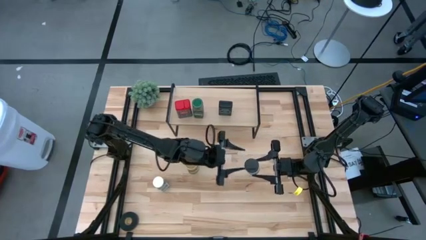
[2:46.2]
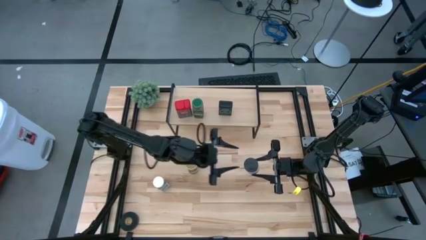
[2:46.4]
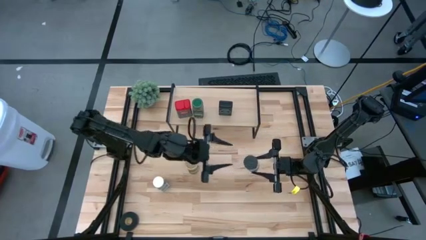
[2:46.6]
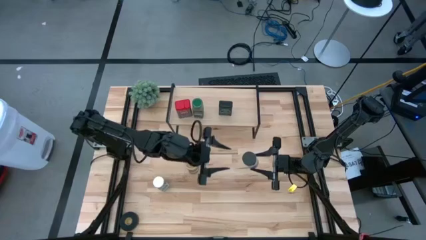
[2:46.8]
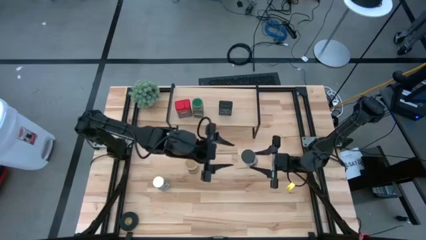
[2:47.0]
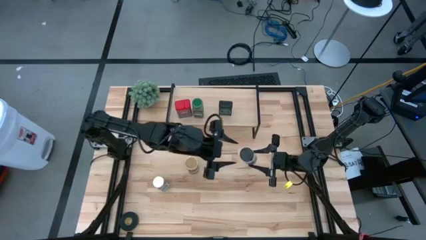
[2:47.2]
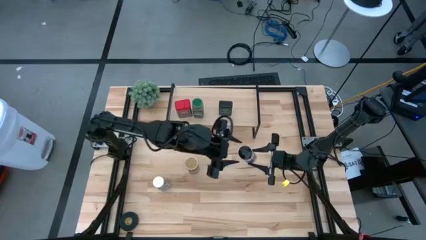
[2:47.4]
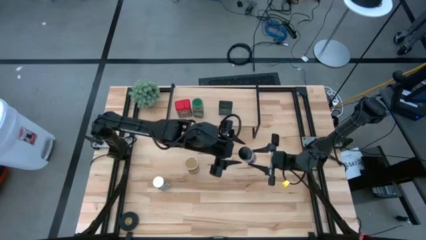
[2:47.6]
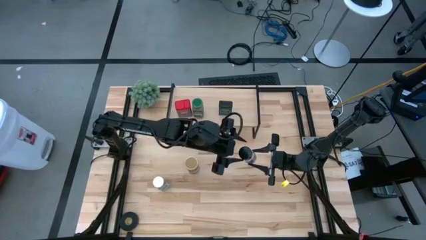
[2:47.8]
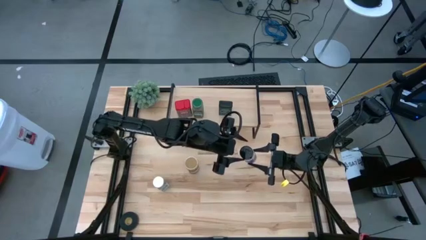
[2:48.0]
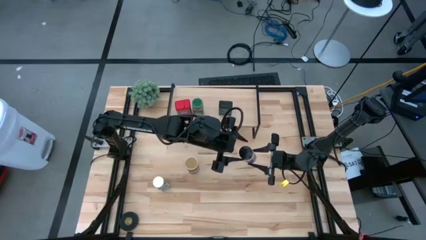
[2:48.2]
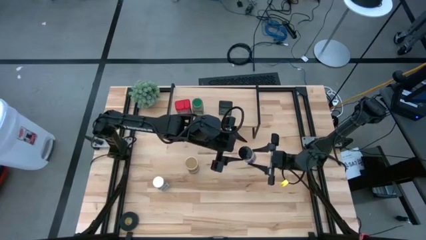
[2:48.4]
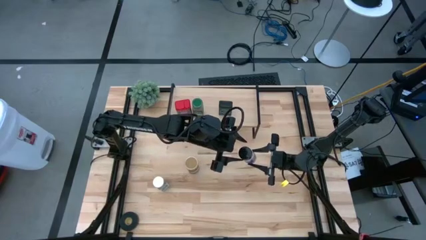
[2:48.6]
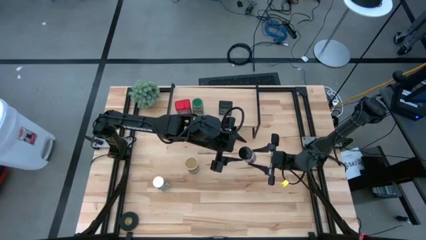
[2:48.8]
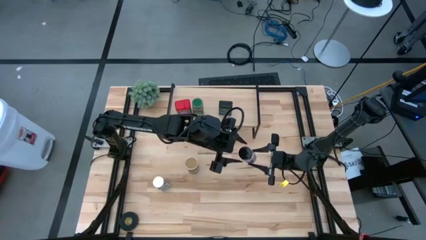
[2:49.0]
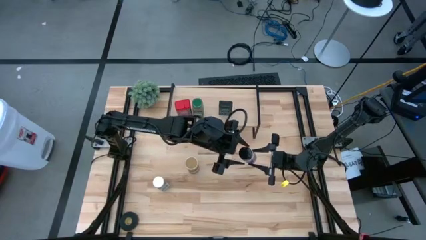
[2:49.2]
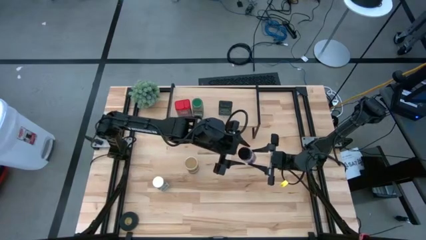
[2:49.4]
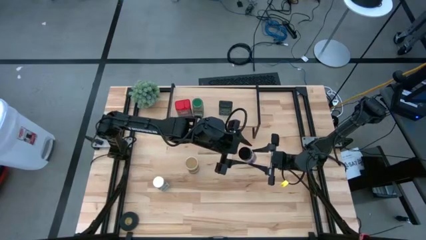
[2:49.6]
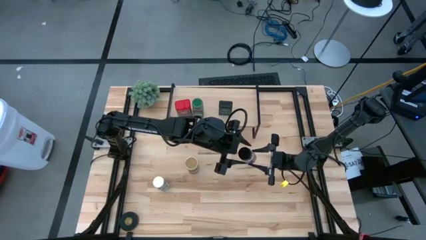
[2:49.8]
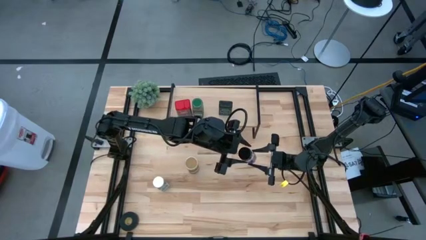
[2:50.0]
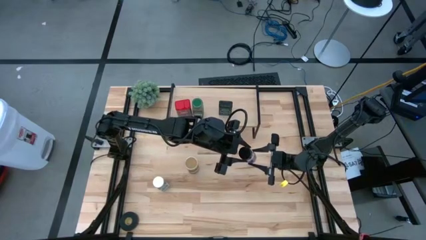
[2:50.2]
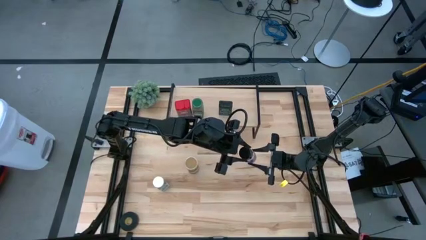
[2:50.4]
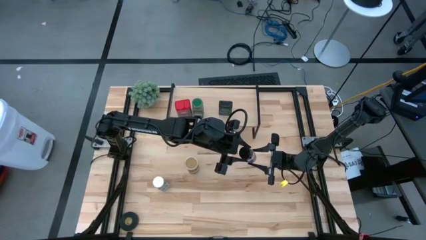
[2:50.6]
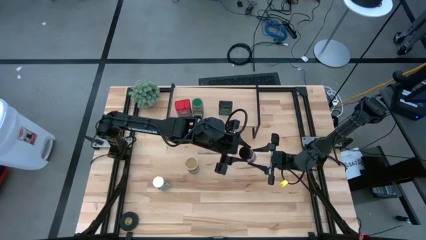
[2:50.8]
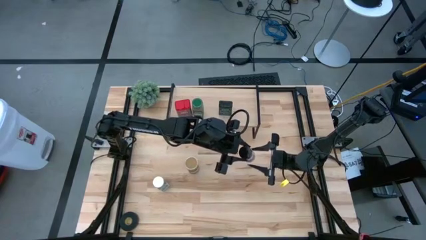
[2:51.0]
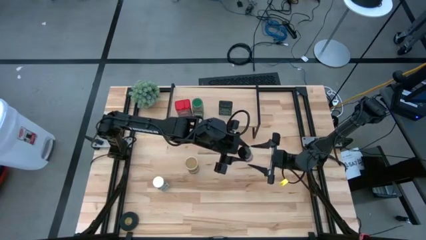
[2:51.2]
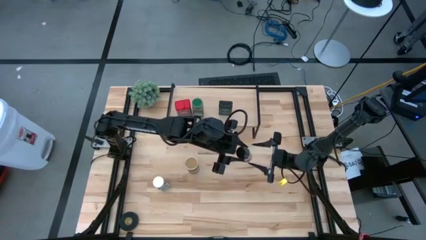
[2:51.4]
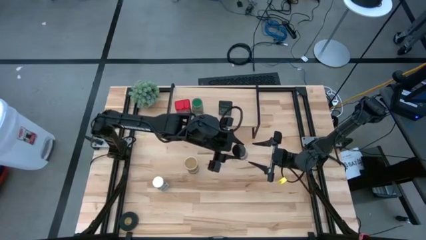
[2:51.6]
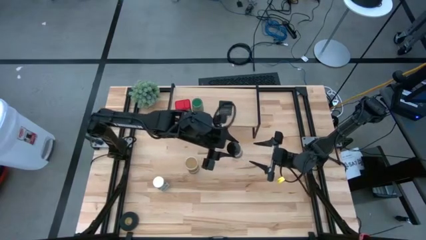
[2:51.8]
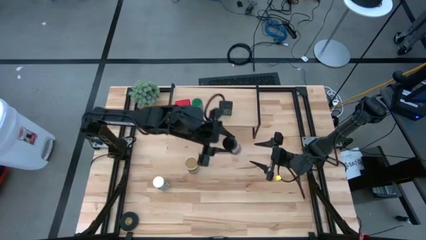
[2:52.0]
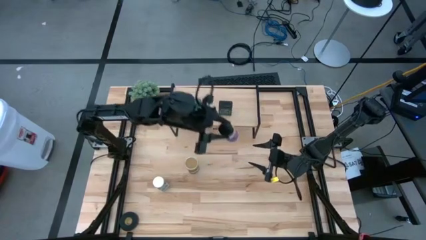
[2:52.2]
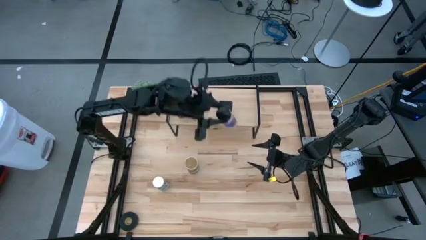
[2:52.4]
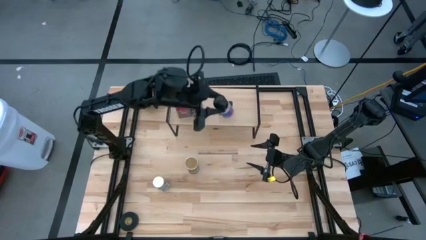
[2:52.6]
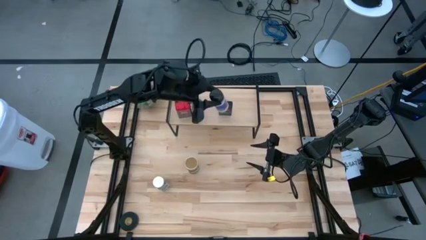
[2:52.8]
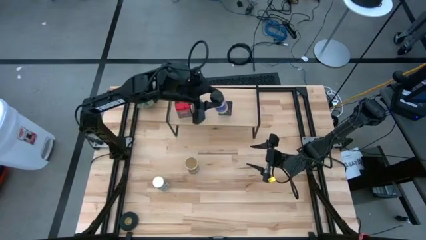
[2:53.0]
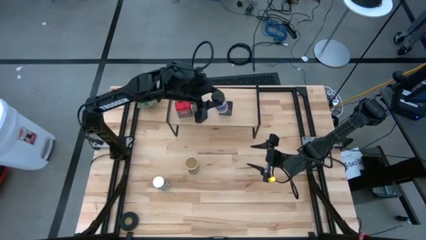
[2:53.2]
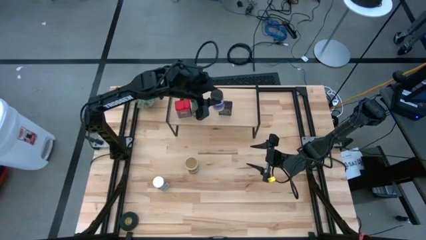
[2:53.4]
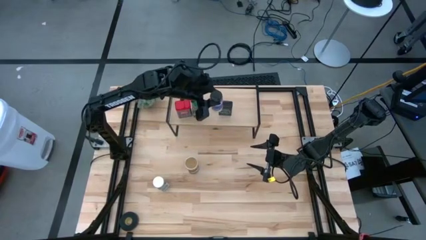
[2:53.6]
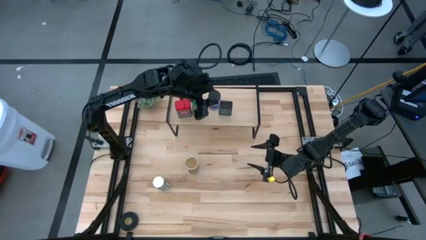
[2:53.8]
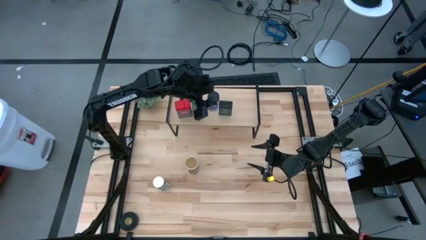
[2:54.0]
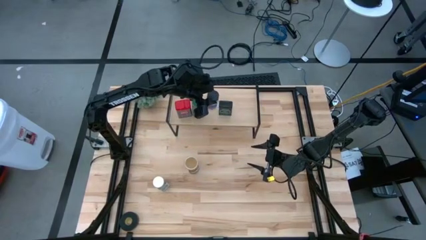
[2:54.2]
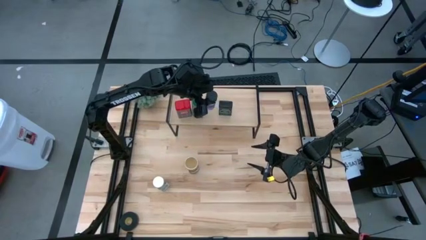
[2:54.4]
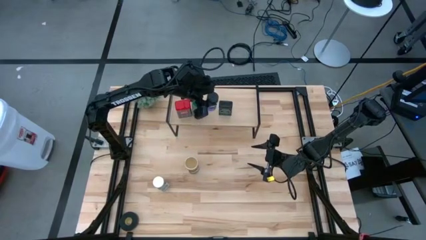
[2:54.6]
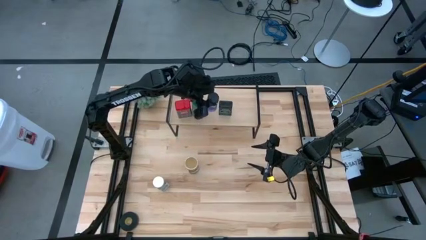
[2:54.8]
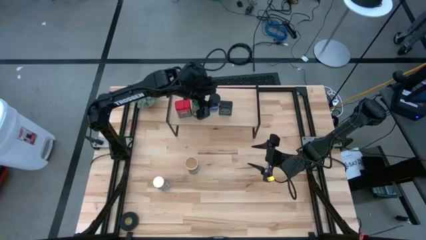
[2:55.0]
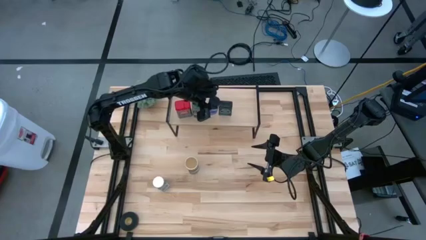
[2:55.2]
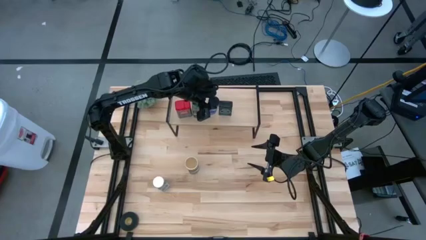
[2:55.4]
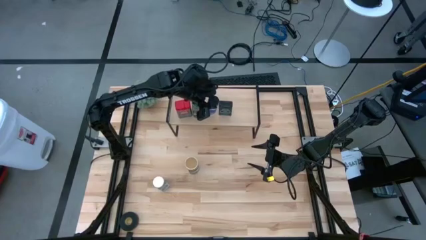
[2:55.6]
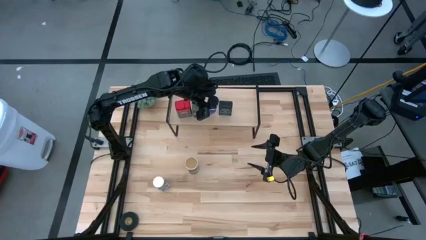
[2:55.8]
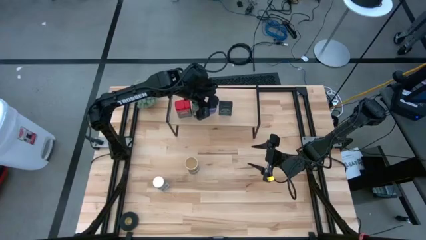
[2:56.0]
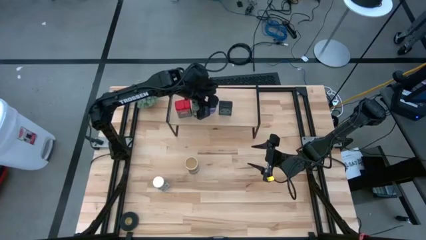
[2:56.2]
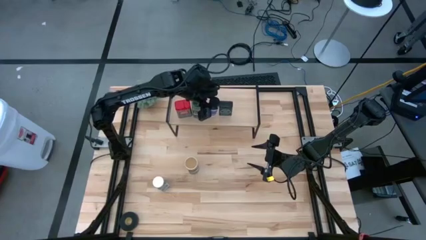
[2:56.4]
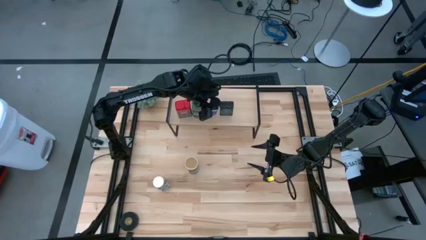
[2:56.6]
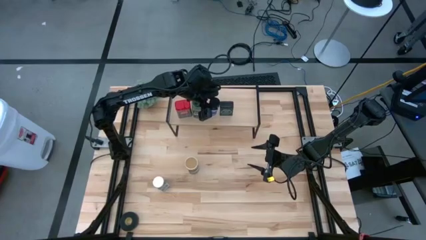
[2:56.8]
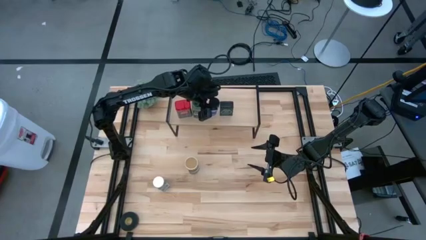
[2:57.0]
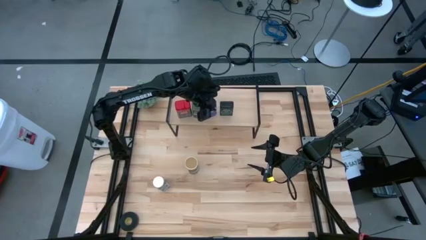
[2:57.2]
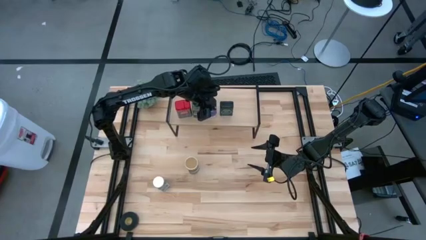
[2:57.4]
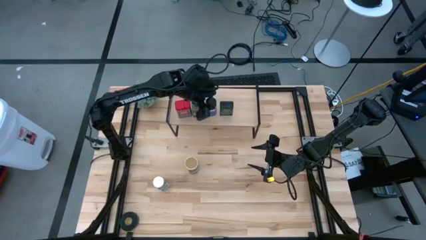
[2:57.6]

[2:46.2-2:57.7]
Task: Shelf spices
Put the black seasoning bottle on the shelf aligned with the other black seasoning can

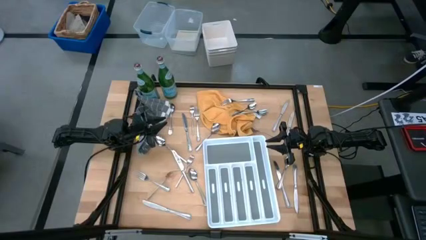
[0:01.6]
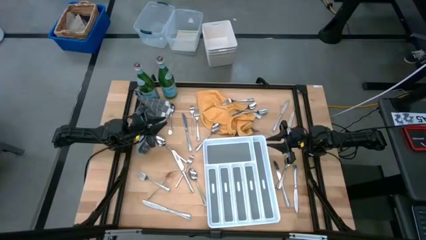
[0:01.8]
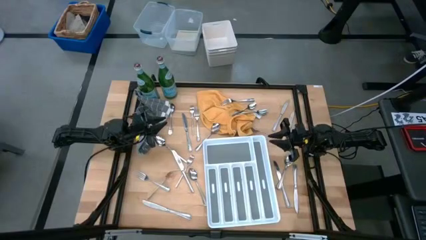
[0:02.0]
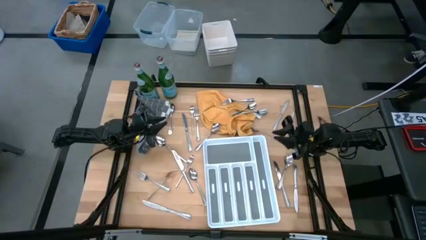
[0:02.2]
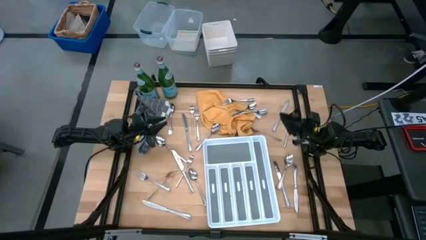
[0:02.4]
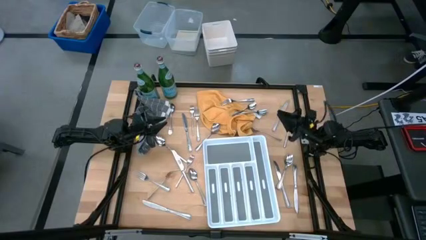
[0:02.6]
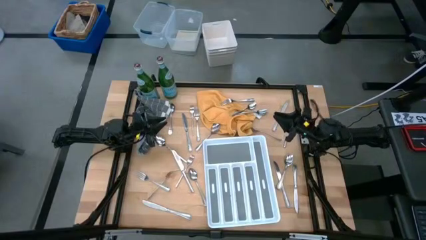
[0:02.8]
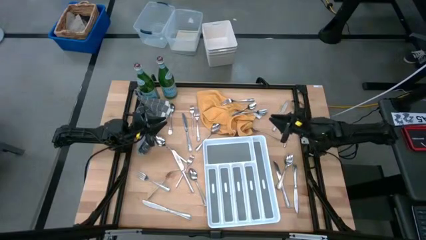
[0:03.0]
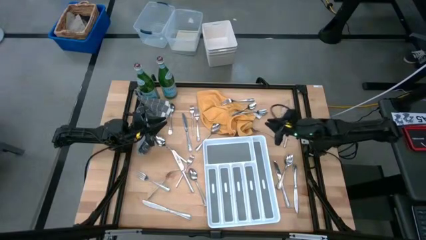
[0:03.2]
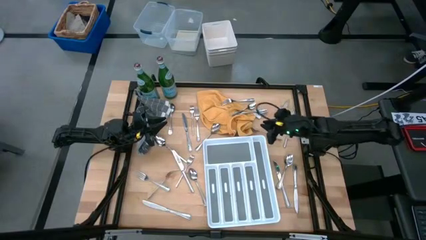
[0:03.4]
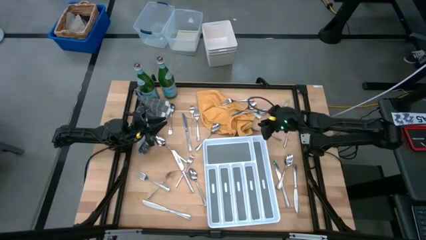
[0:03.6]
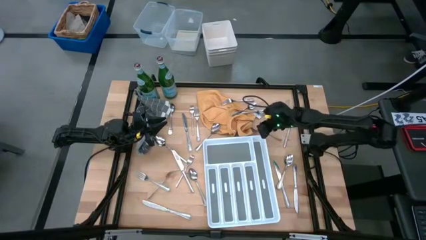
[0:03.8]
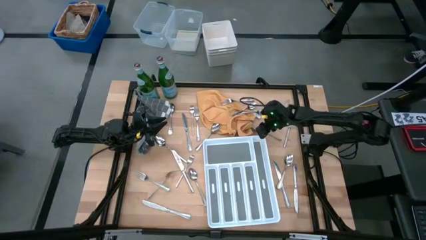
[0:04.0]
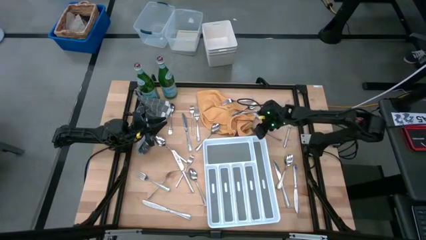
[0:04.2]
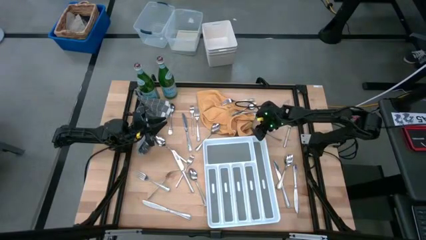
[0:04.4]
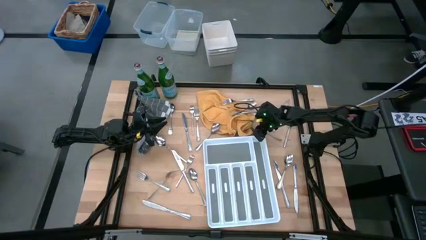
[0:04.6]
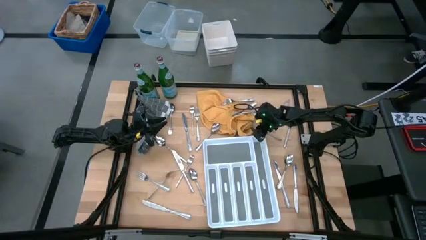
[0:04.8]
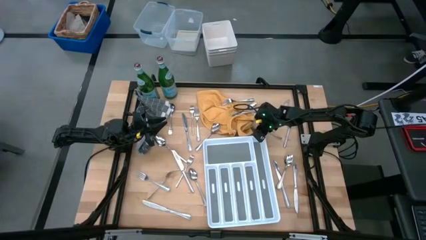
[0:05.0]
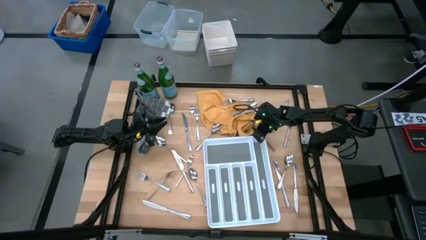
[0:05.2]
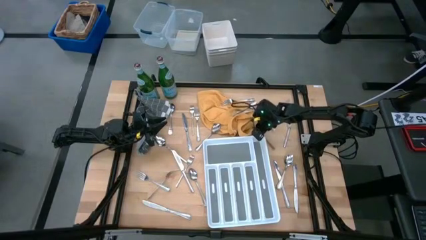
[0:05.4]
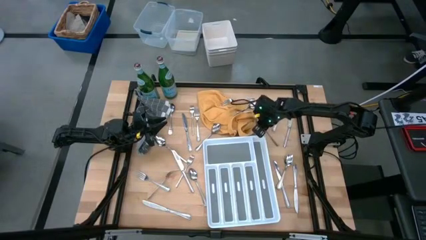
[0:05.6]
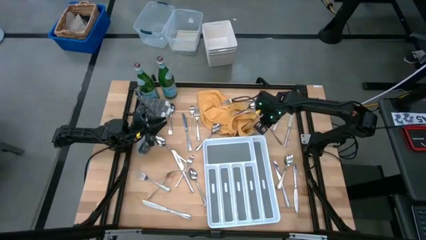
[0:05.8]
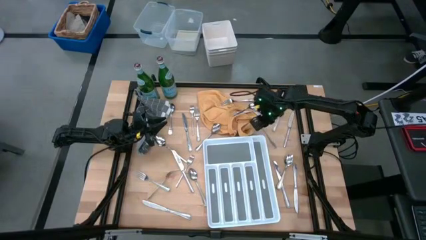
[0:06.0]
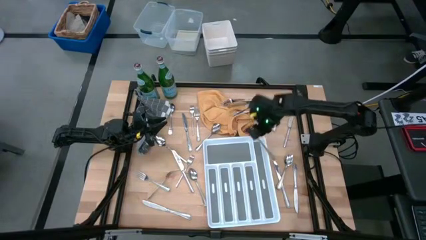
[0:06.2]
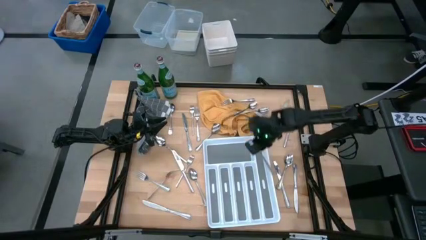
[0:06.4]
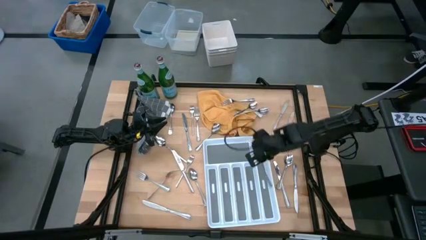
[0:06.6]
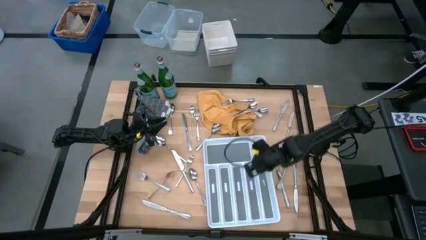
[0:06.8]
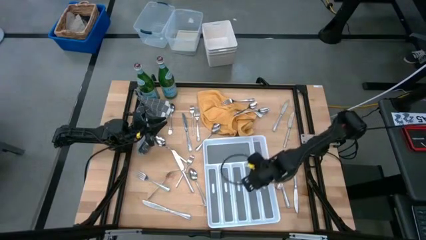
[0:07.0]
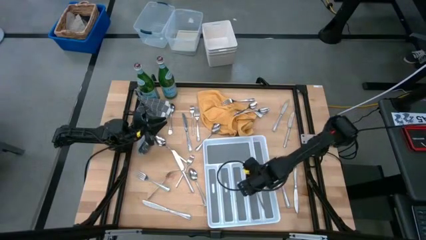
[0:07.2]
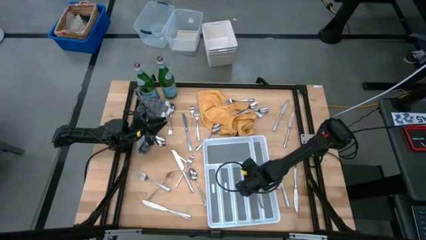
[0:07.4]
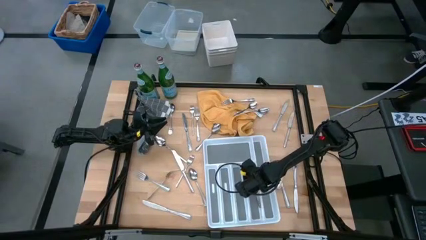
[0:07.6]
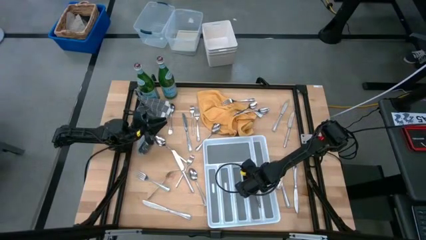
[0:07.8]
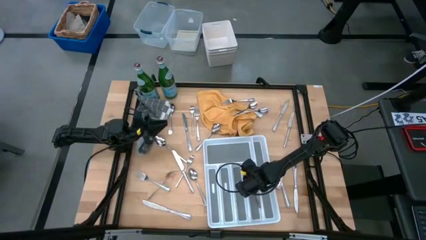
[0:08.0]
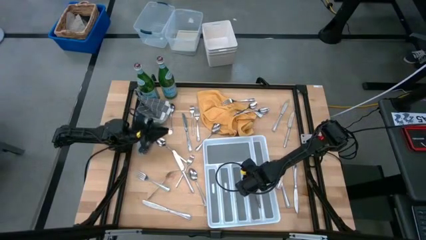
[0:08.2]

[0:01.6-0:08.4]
Task: Sort silverware
Put the fork into the silverware tray
